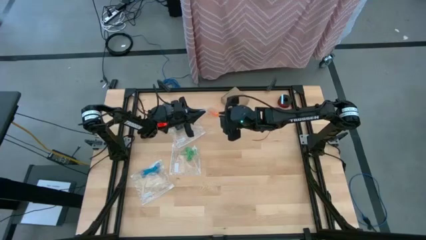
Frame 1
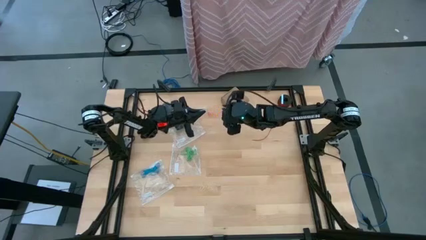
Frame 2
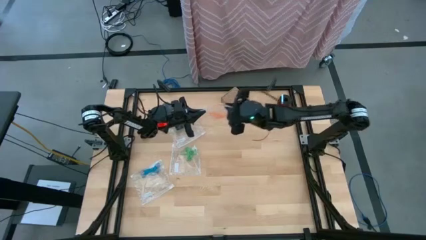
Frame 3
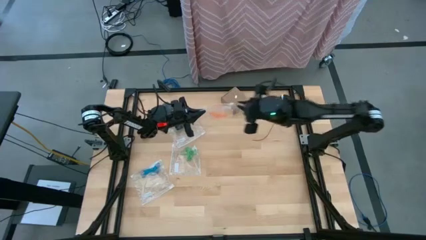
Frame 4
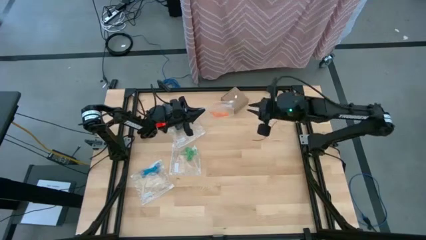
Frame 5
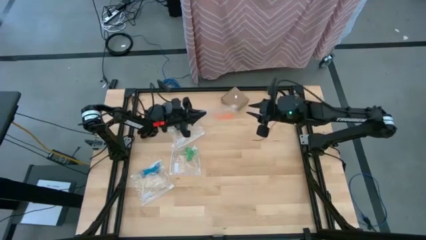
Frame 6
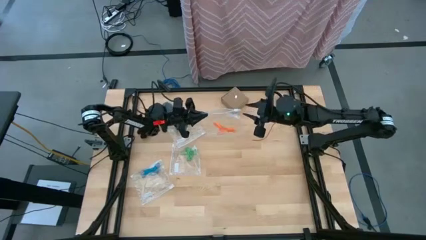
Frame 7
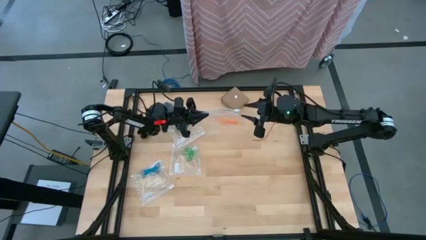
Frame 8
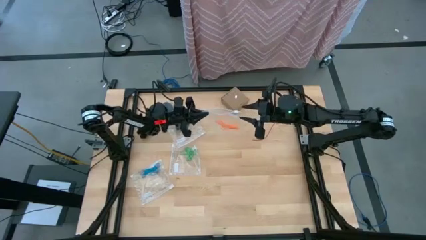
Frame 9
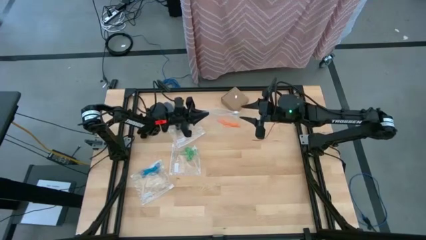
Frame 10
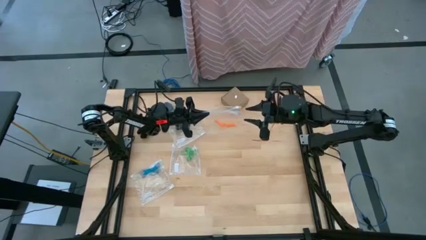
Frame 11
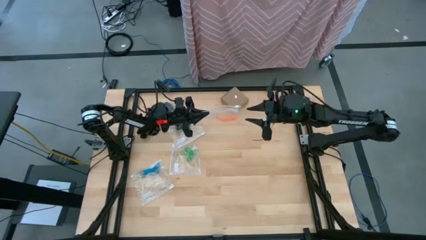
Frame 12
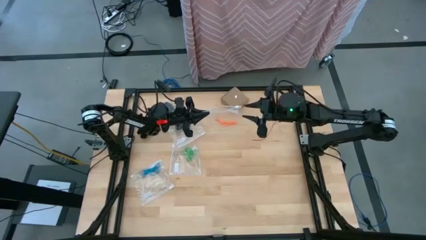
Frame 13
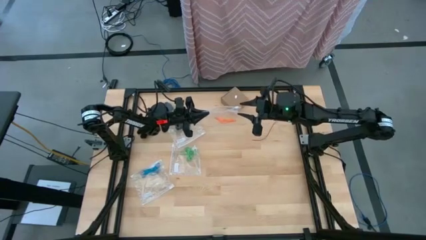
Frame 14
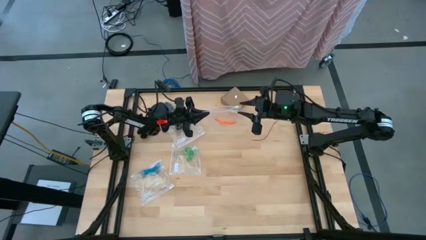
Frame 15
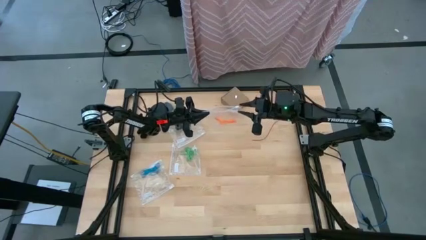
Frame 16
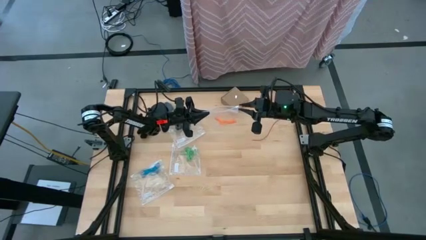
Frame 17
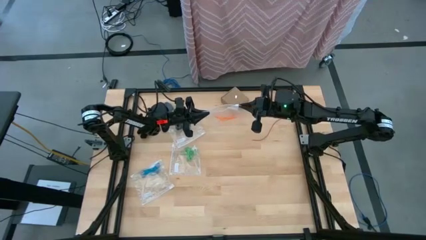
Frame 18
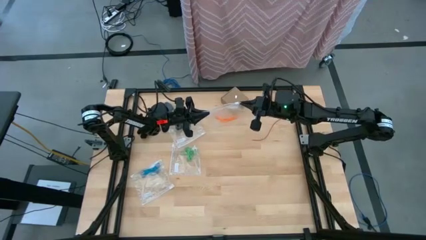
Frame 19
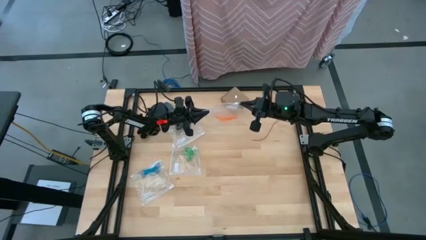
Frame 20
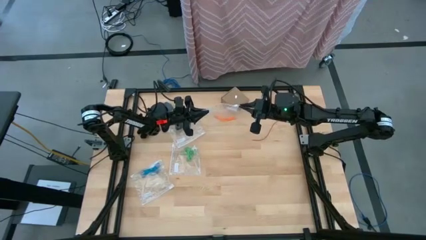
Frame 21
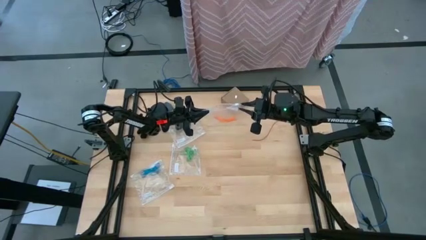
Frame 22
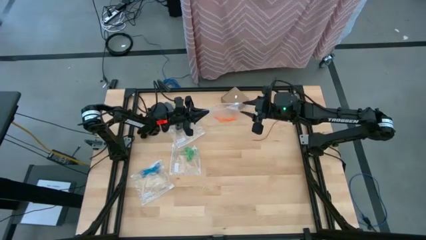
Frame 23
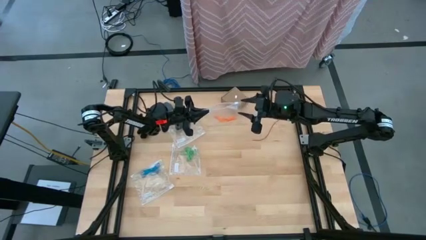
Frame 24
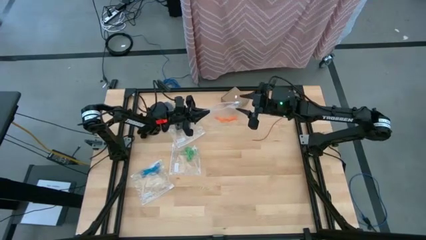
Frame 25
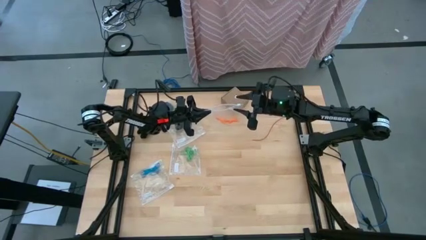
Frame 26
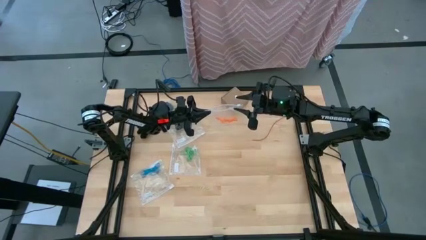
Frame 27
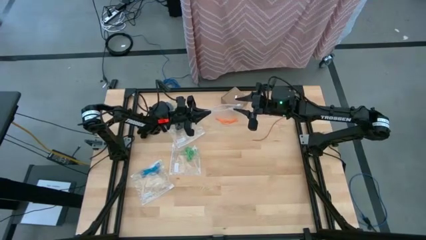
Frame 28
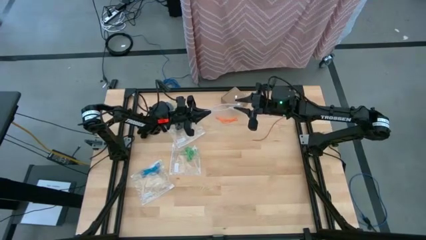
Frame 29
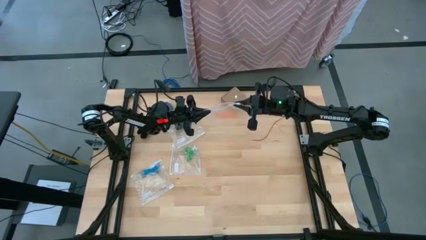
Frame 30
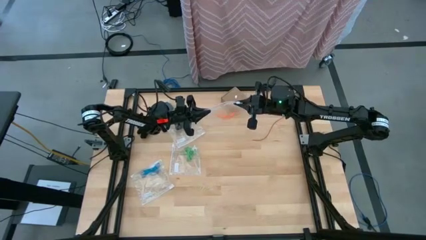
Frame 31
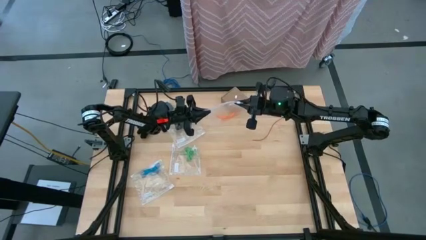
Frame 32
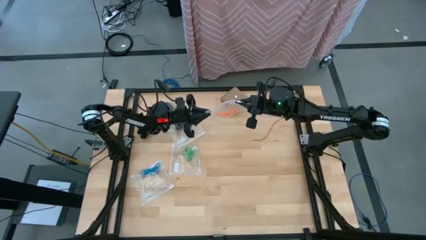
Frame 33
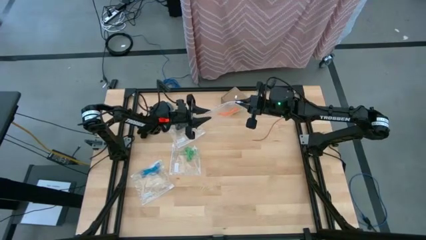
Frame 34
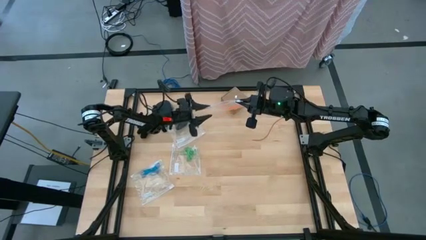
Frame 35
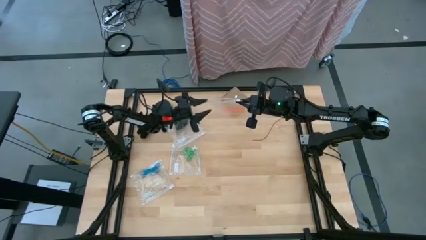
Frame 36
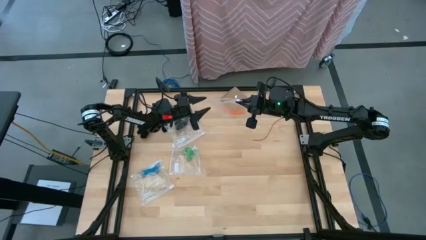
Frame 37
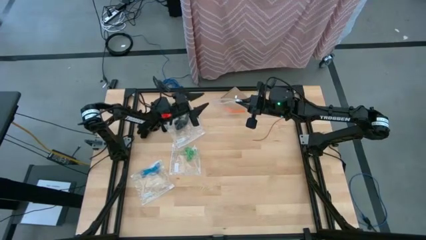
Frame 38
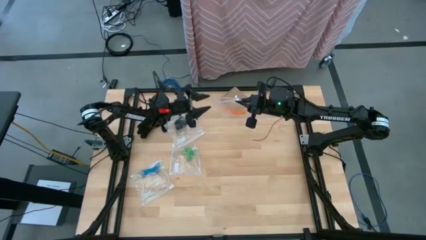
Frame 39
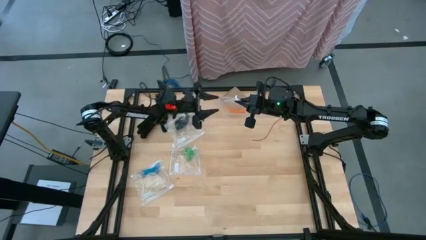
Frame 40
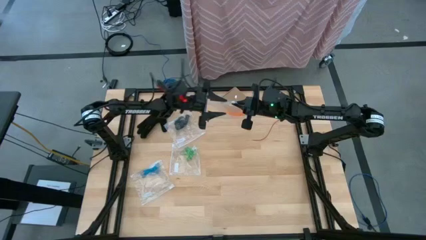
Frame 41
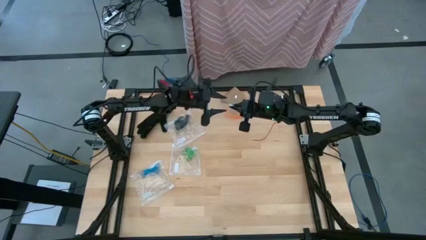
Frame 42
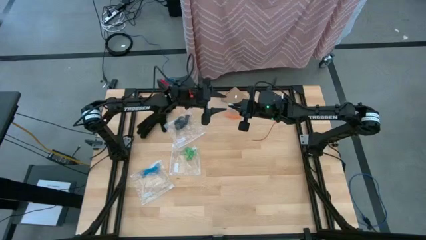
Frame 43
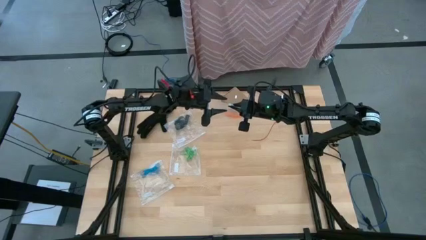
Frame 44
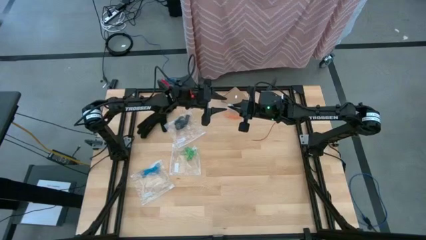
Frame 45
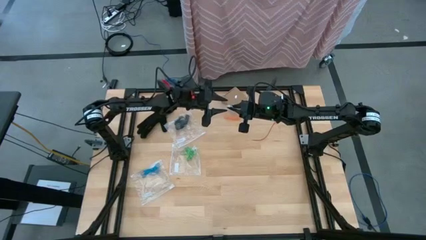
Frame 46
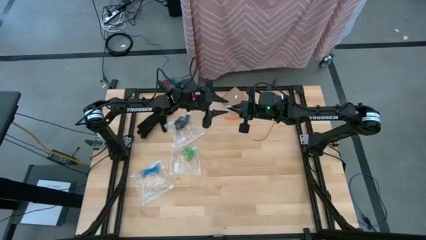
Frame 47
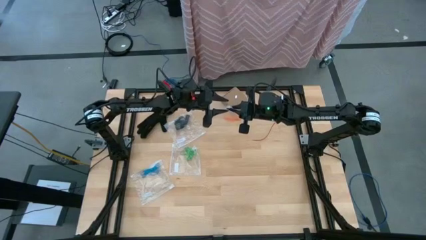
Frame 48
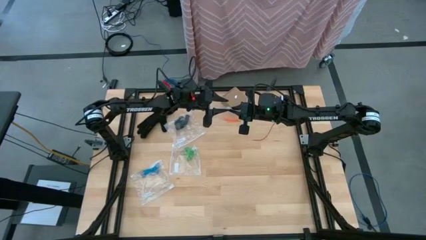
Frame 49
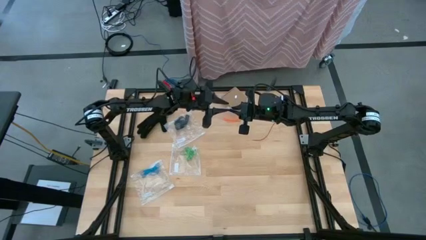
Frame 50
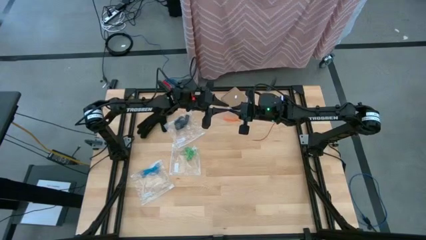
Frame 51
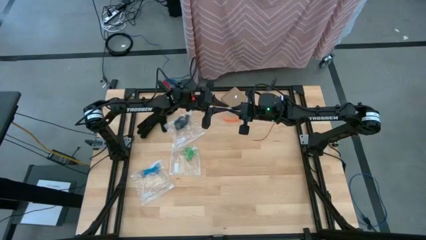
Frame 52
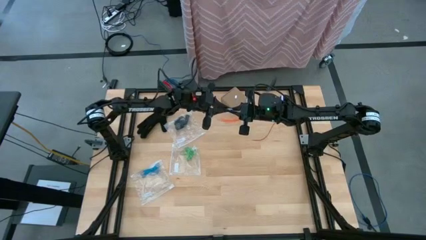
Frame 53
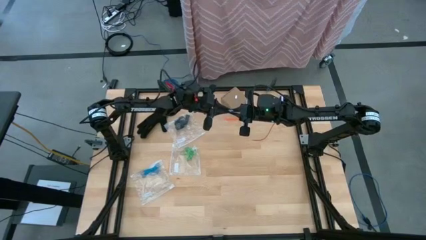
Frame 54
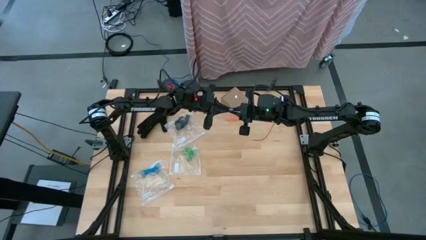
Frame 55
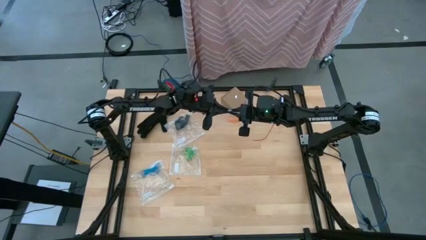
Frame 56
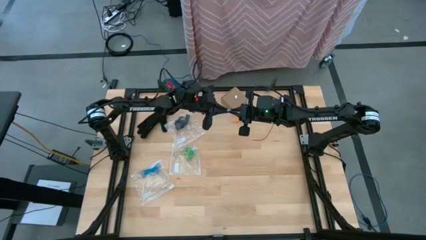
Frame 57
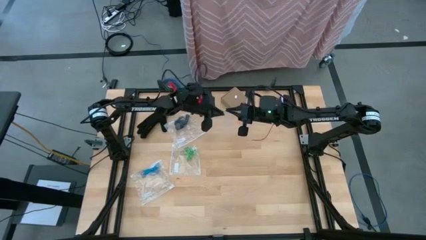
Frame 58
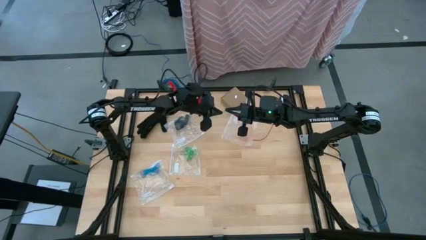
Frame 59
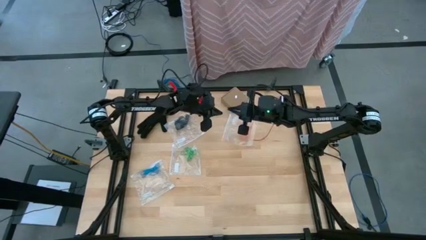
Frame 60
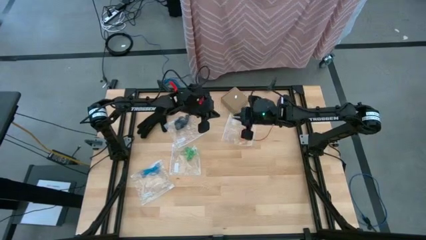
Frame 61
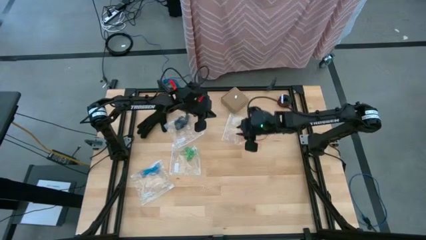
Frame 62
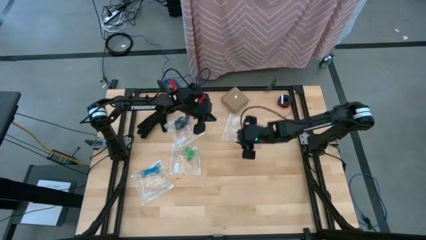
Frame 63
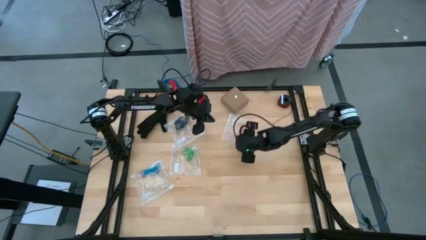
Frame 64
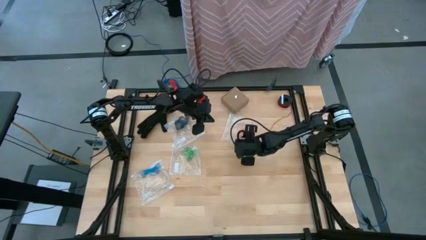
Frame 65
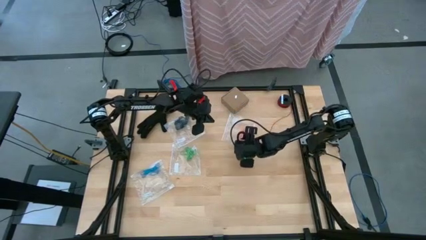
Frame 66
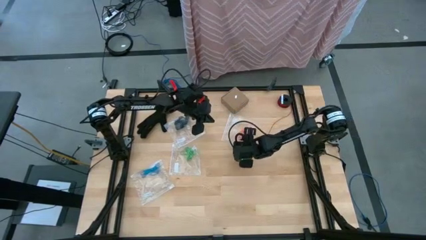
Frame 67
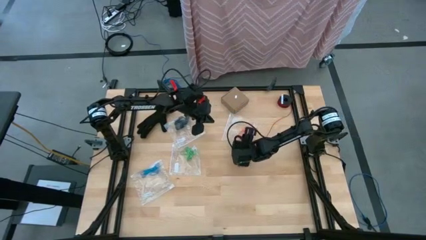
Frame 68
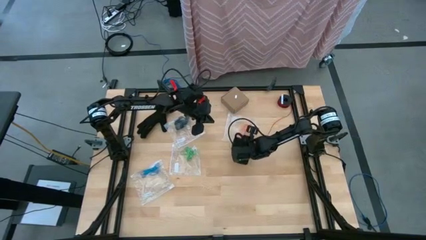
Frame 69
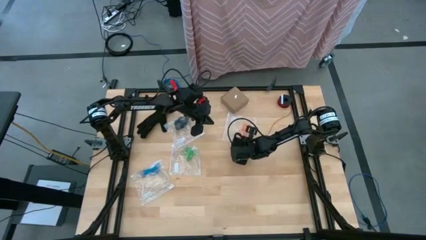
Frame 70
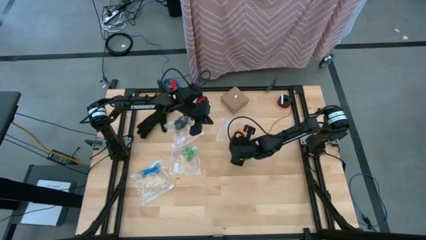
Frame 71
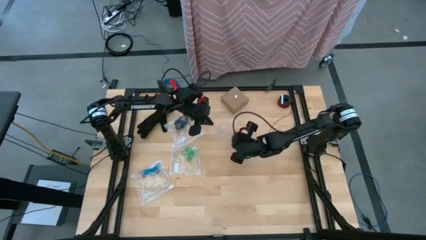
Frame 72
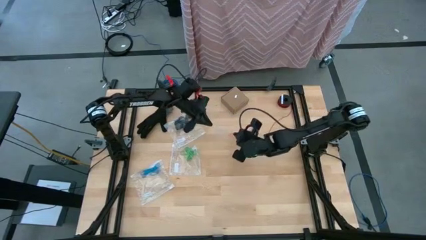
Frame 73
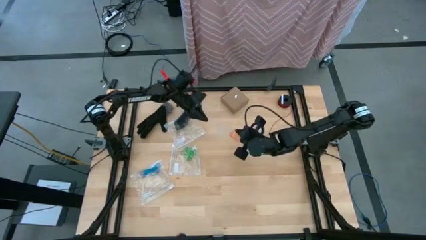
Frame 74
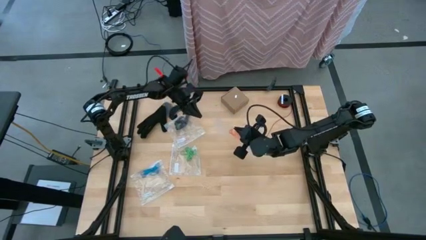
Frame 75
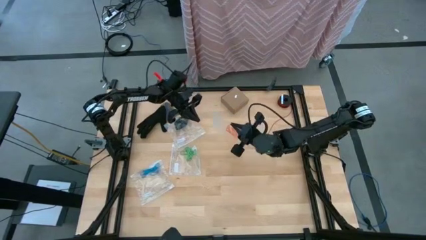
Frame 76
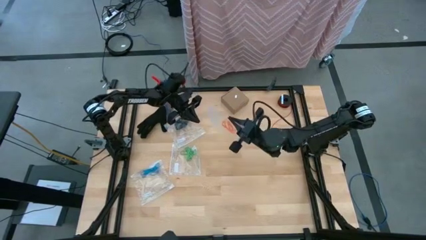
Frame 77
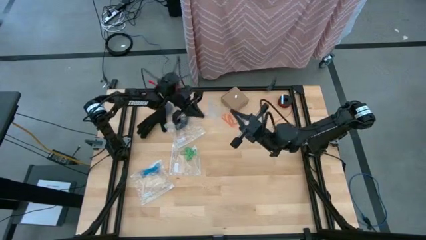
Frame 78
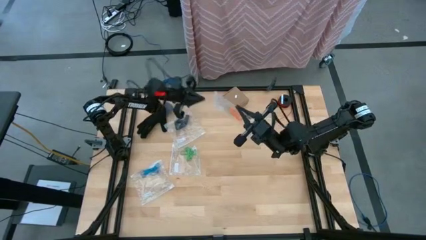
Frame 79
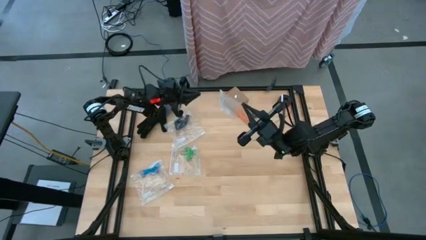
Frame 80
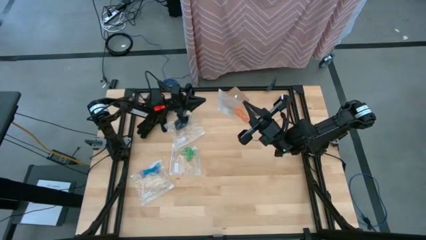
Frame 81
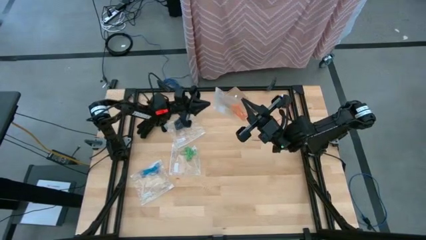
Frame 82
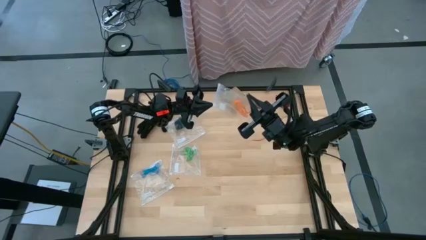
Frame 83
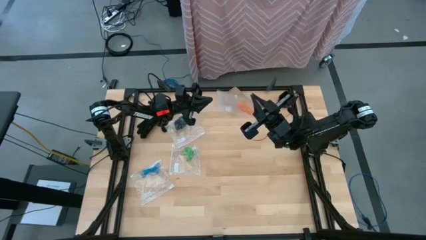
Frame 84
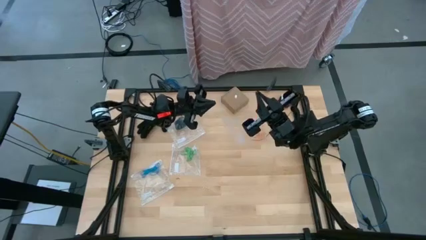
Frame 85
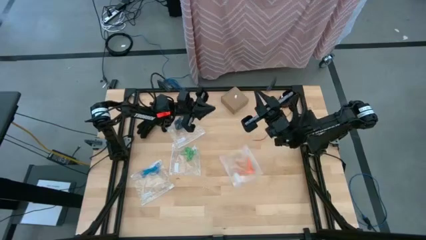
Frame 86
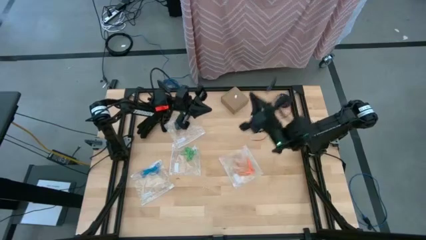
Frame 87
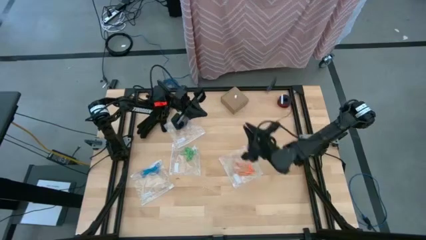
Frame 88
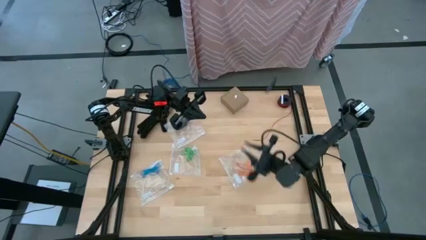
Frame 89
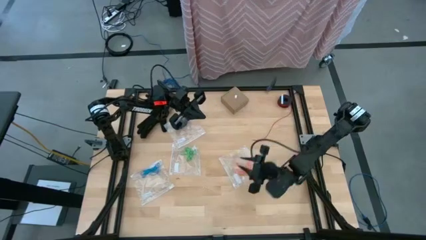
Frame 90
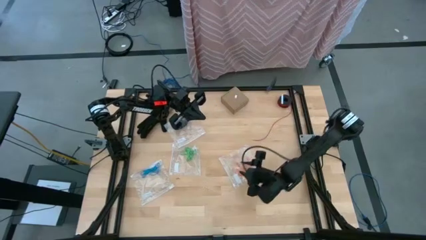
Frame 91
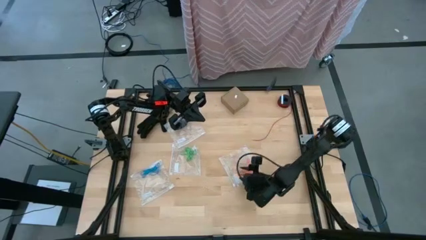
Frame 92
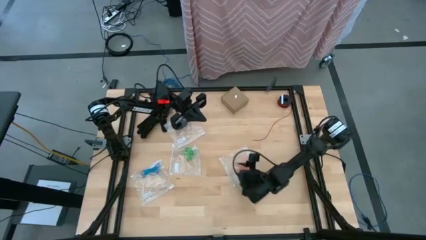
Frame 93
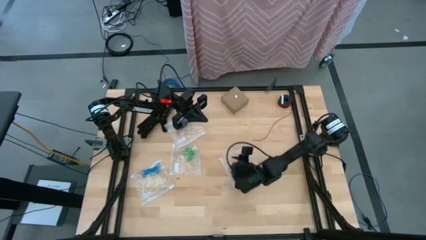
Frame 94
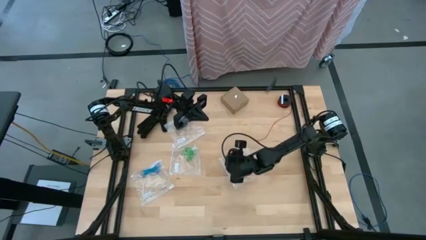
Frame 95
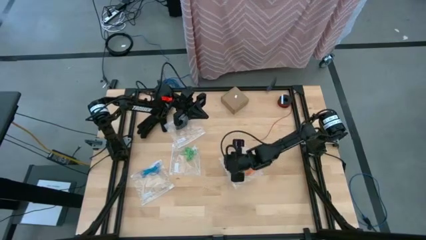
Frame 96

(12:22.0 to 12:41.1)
Task: Sort rubber bands
Close the transparent zip bag
